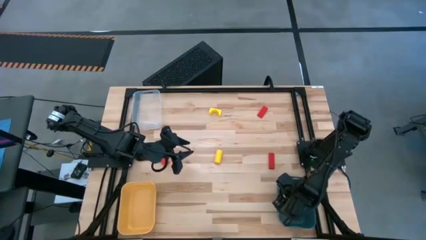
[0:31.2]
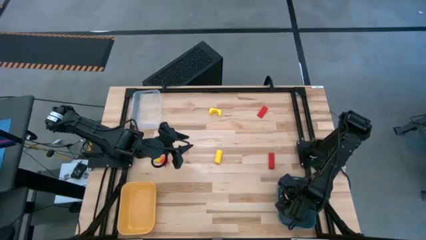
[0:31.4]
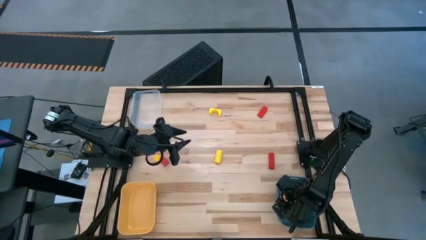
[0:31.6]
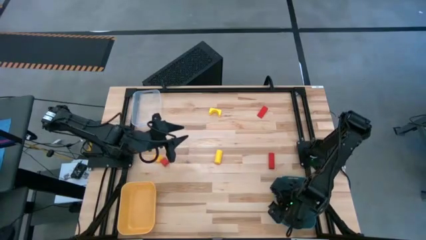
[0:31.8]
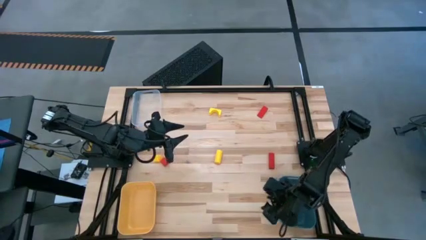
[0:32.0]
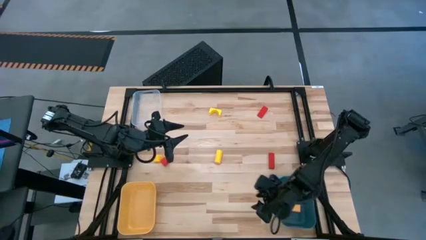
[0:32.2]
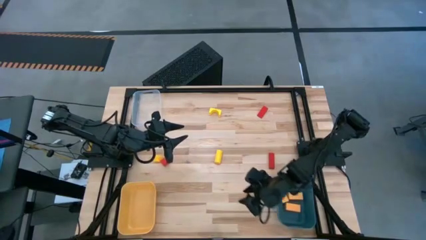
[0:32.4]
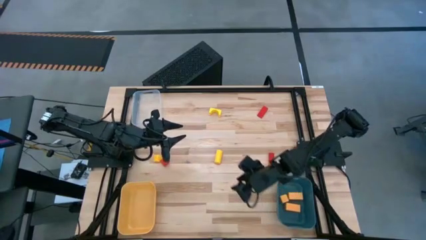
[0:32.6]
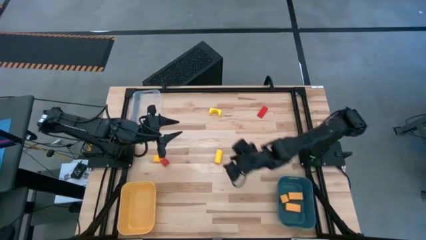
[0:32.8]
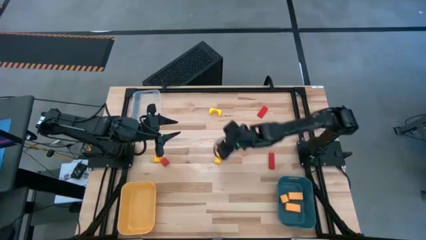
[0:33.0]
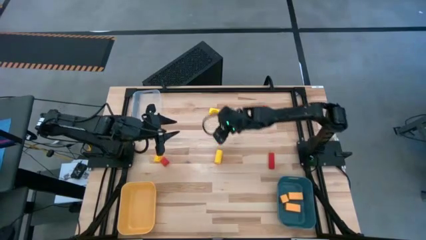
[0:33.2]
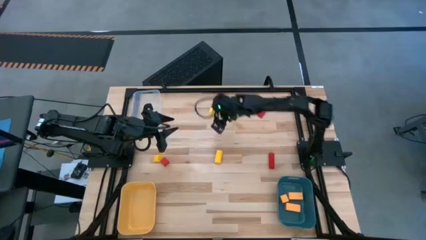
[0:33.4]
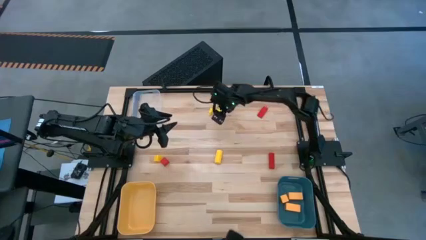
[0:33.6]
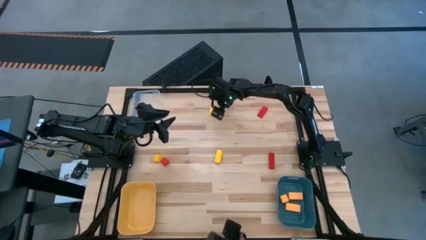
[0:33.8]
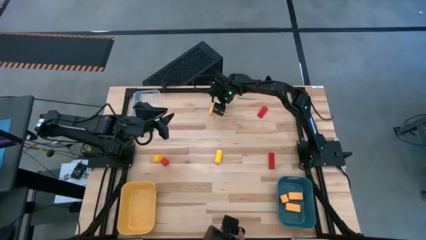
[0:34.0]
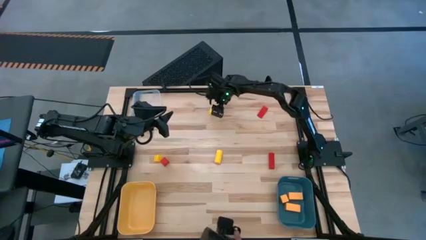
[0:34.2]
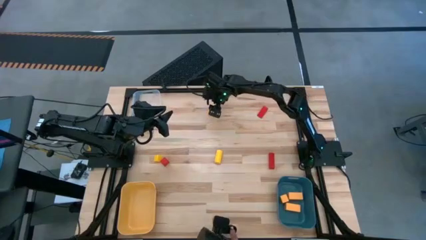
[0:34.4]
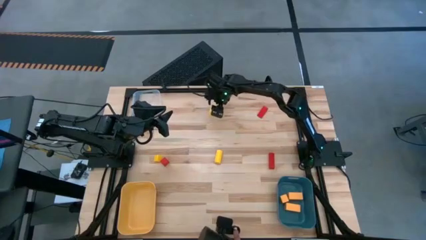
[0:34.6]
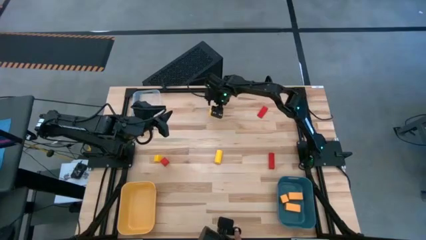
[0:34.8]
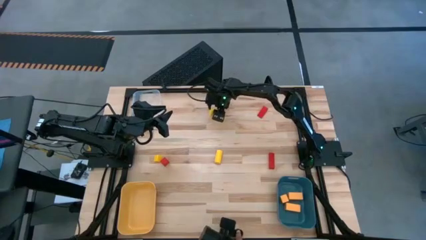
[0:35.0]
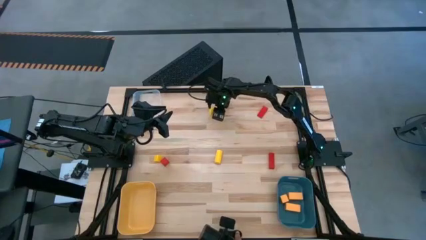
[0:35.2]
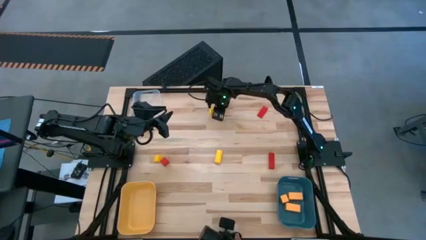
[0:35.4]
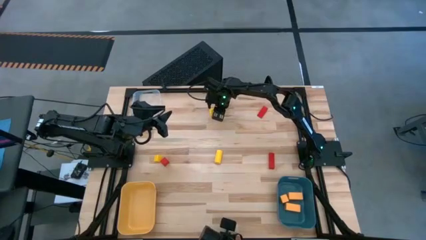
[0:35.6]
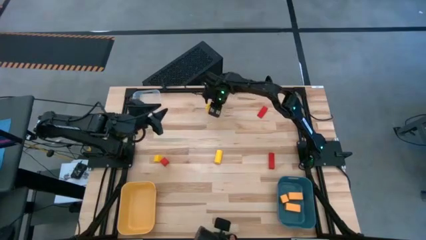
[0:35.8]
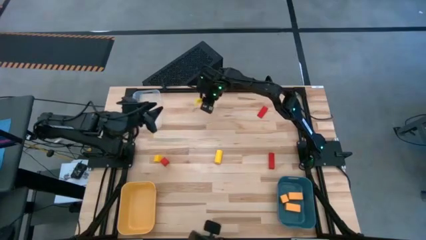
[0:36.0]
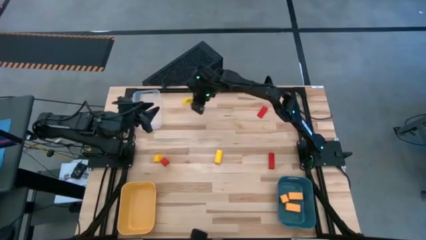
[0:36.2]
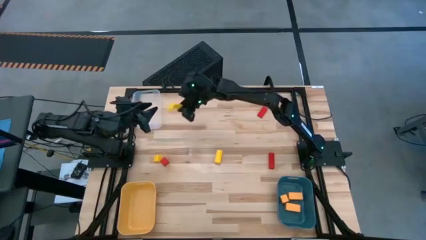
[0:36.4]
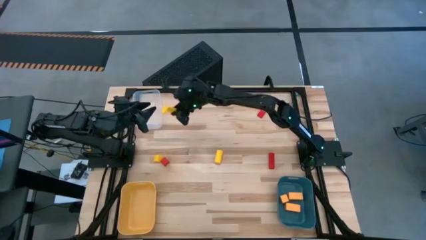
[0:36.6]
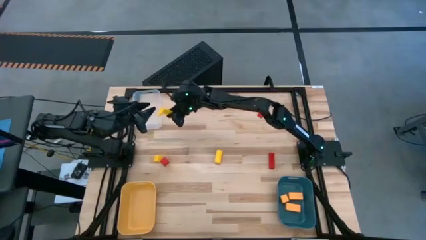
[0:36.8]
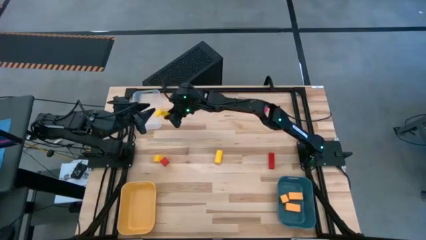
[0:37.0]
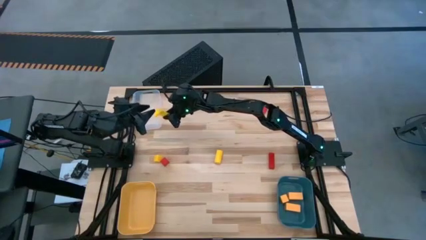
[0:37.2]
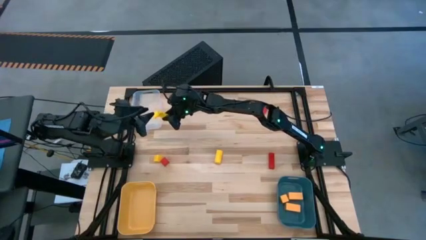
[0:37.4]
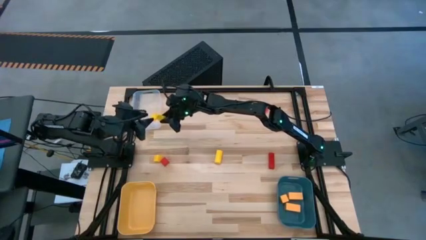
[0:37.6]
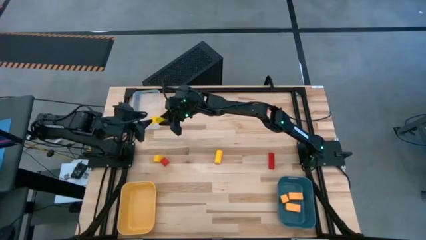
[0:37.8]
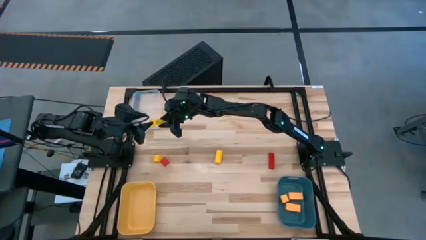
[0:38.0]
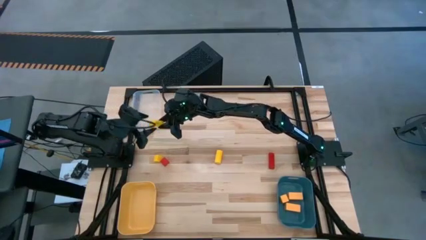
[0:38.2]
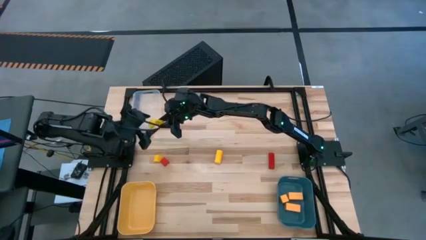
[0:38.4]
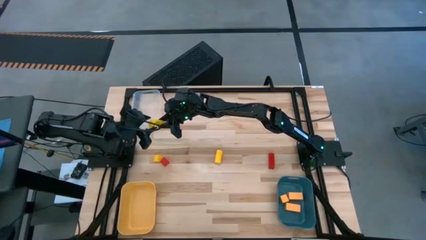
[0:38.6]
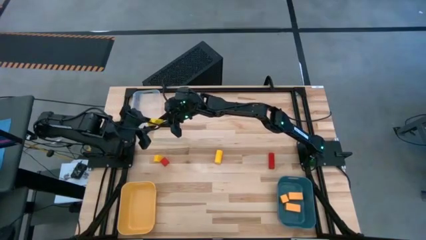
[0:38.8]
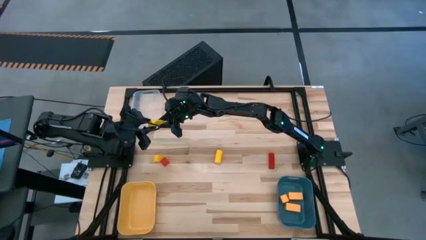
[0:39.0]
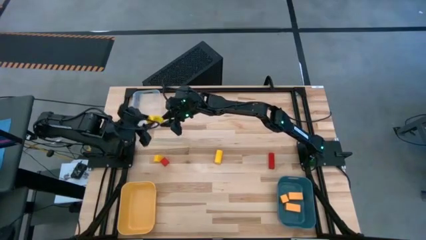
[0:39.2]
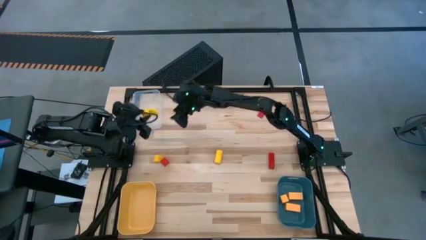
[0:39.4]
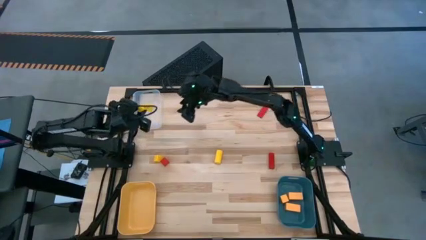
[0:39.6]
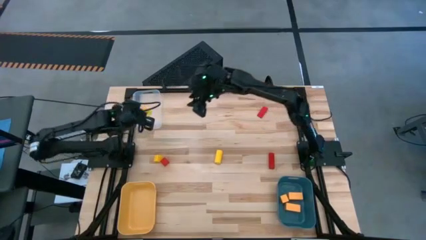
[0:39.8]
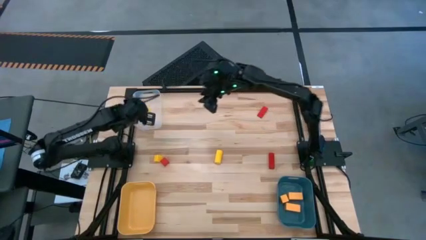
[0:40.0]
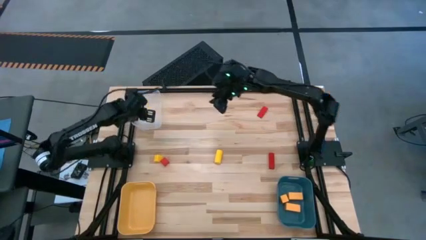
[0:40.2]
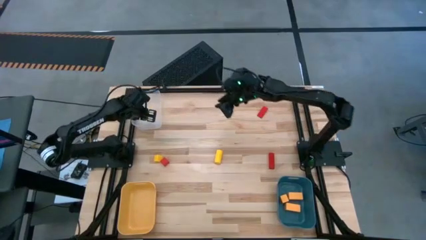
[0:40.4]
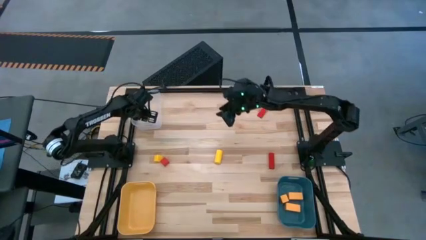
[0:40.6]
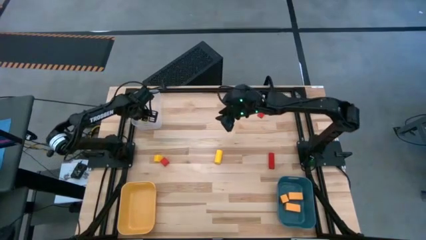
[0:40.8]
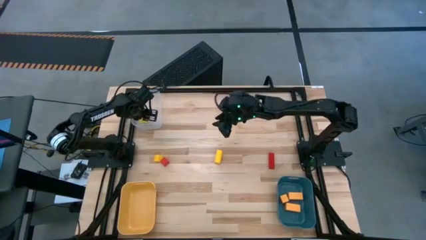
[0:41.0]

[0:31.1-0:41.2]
Task: Sort & place blocks by color
Put the top right yellow block into the transparent white bin

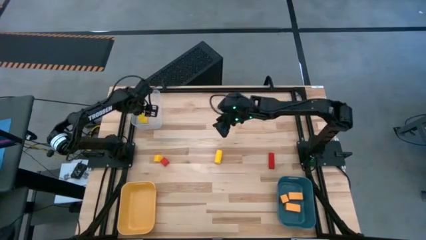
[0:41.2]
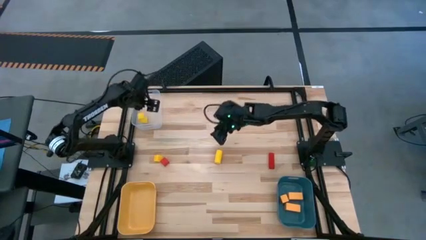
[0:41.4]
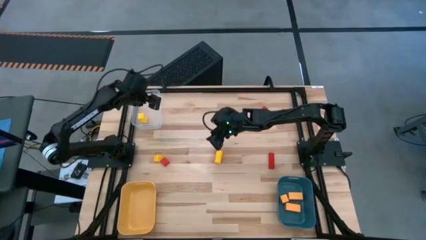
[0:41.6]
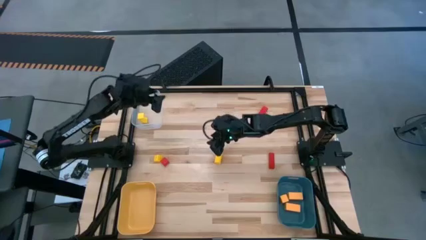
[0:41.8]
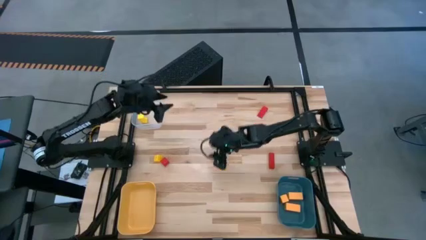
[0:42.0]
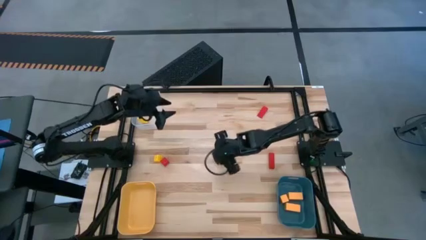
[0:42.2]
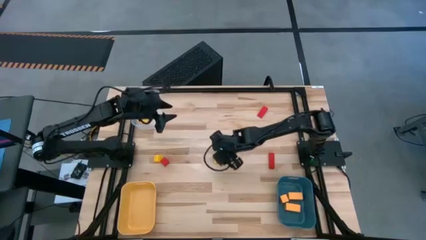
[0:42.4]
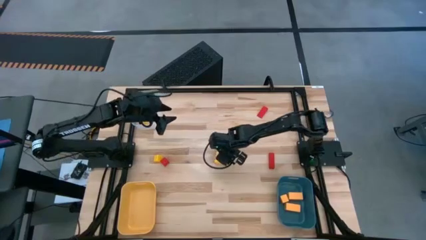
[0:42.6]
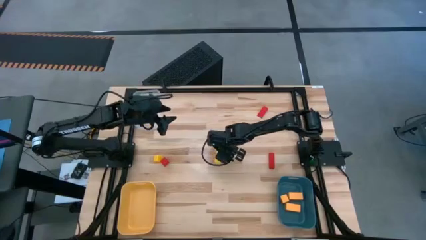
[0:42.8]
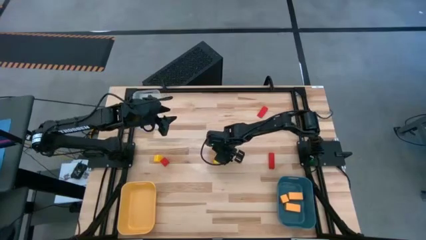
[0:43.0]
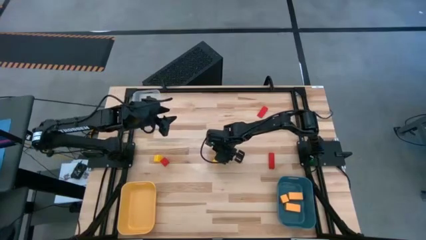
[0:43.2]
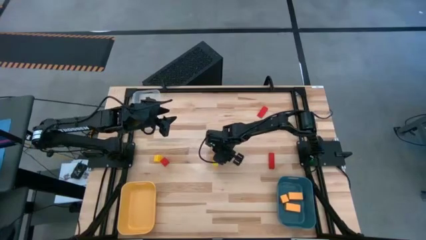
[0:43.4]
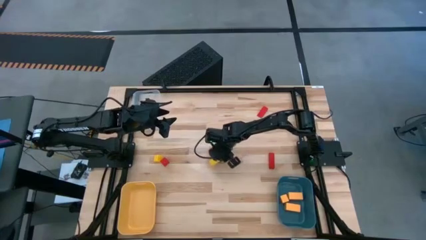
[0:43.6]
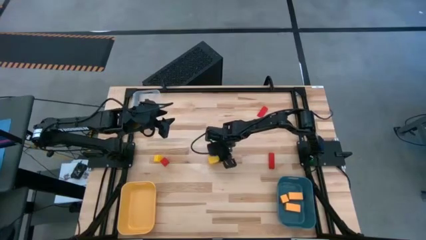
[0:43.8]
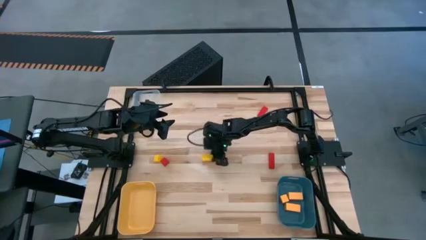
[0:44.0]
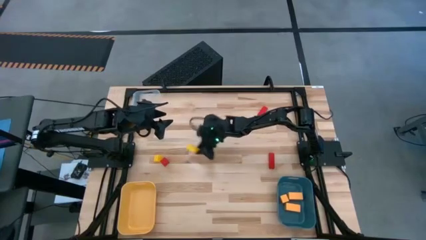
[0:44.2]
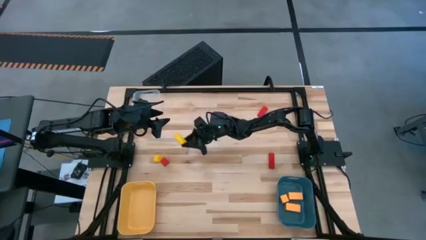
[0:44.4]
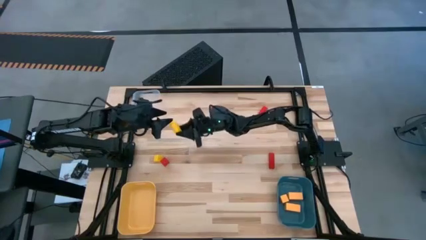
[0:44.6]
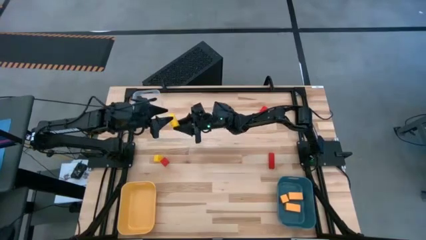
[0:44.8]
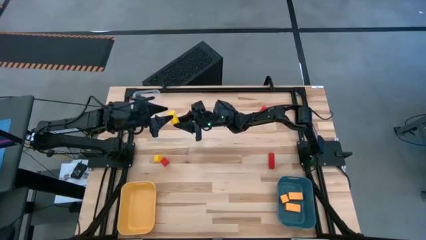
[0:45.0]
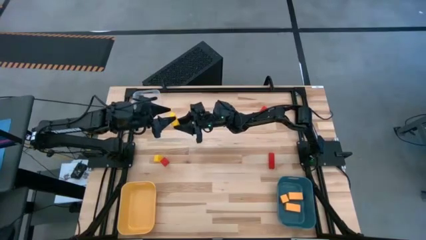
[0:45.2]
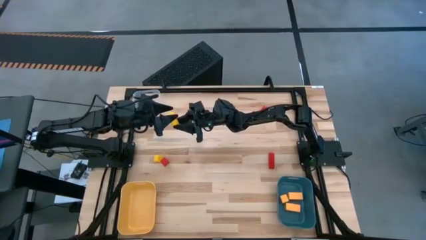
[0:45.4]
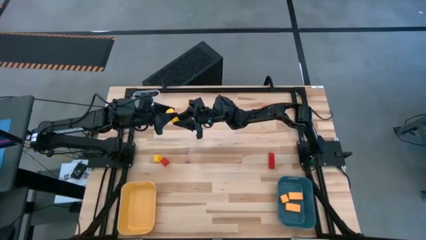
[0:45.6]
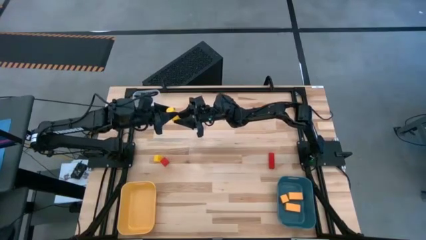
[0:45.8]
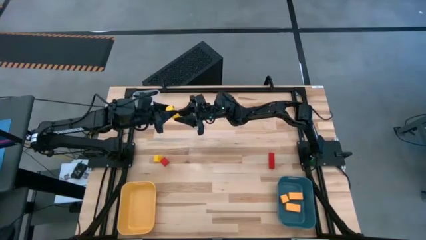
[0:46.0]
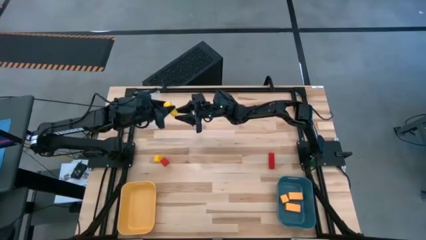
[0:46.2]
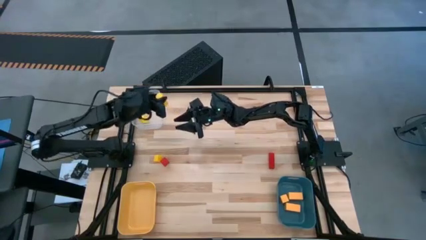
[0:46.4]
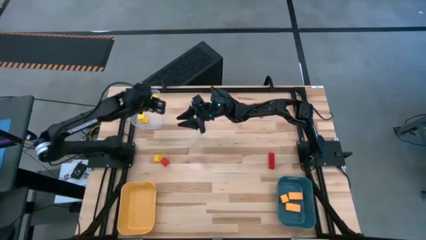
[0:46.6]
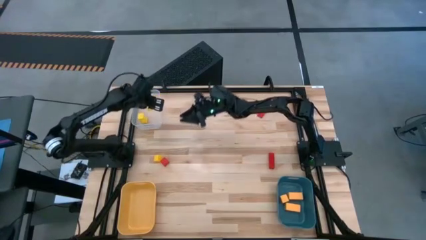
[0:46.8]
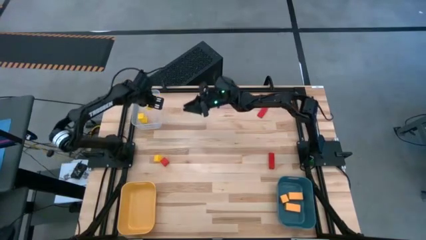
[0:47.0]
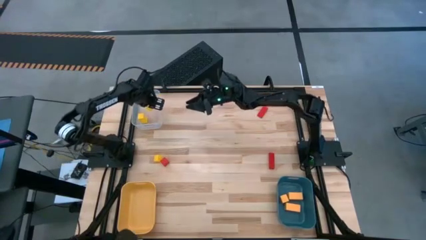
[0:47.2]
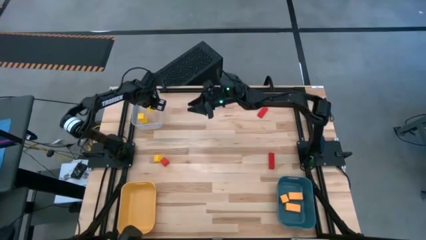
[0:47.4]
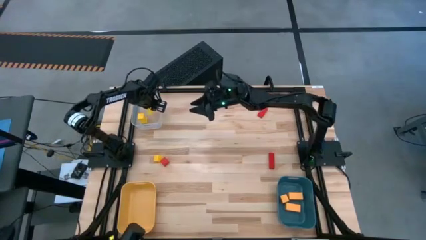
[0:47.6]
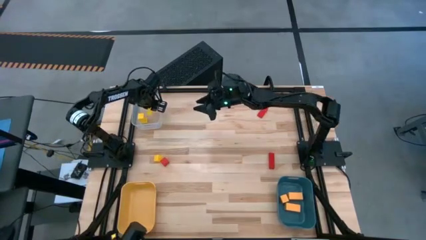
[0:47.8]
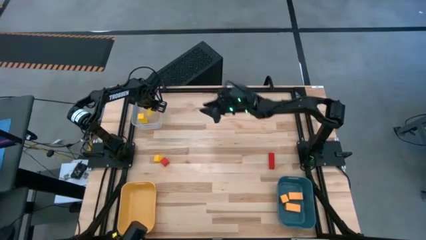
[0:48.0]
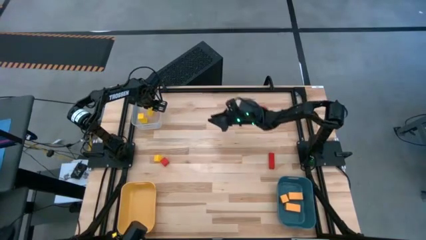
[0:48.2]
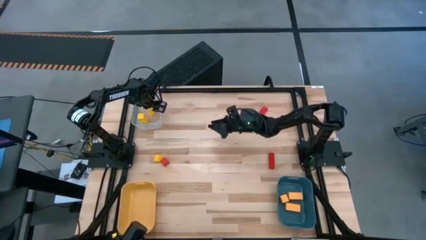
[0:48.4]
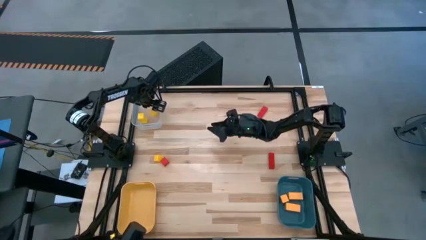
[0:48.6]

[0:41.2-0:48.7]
Put the right yellow block into the transparent white bin
